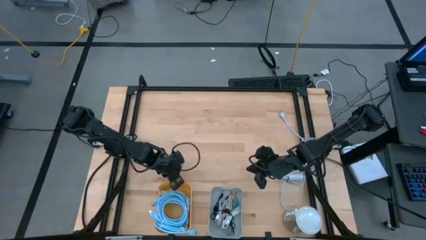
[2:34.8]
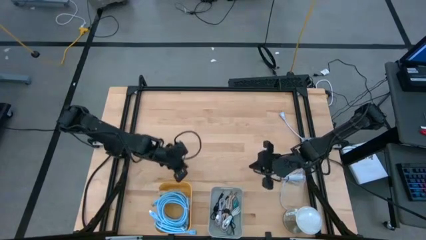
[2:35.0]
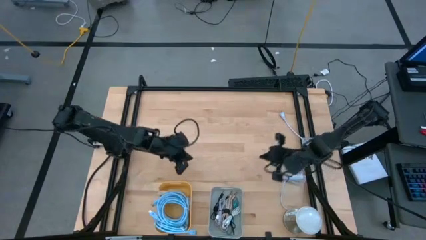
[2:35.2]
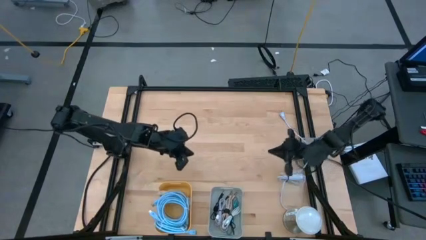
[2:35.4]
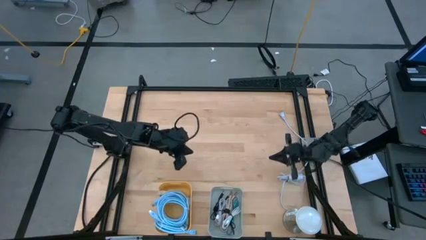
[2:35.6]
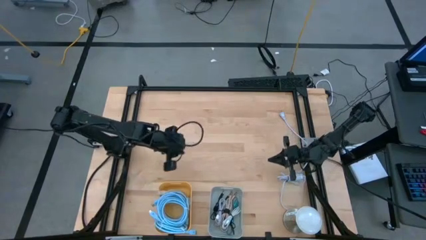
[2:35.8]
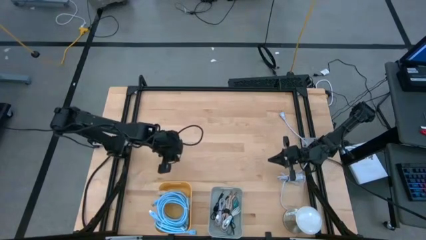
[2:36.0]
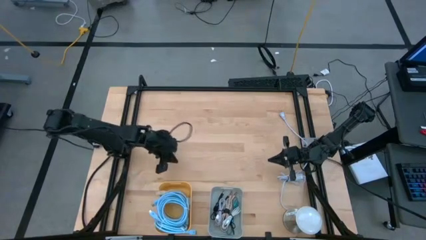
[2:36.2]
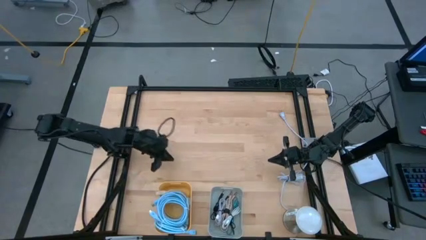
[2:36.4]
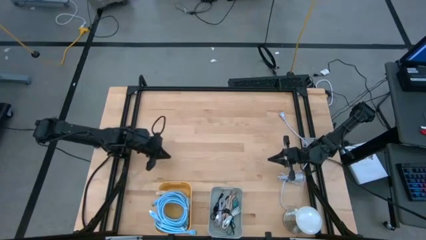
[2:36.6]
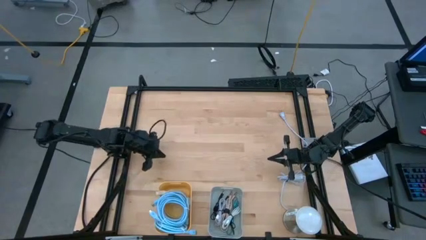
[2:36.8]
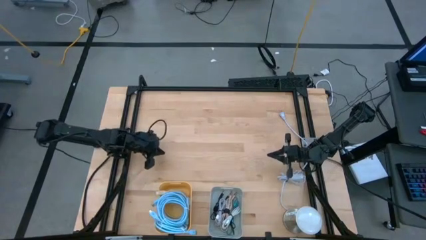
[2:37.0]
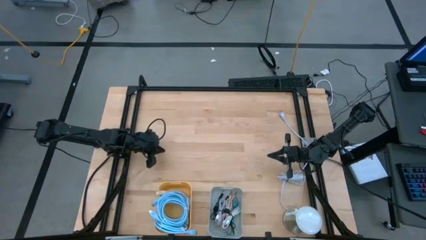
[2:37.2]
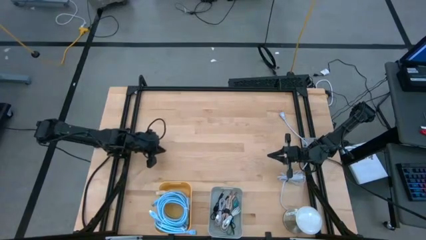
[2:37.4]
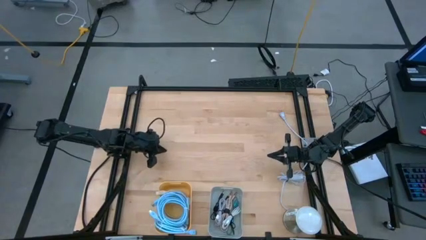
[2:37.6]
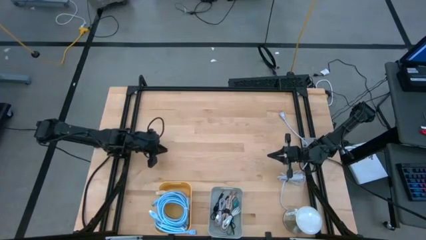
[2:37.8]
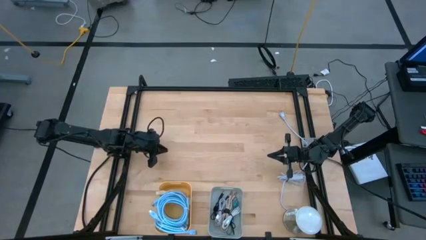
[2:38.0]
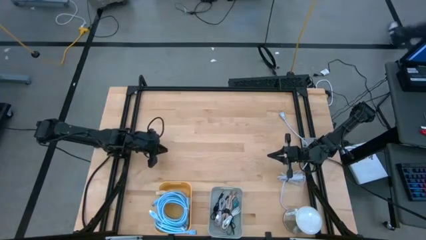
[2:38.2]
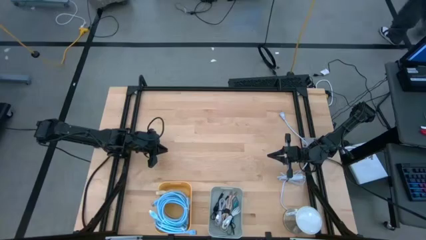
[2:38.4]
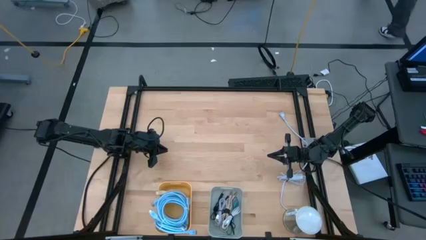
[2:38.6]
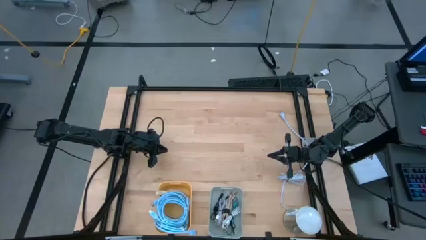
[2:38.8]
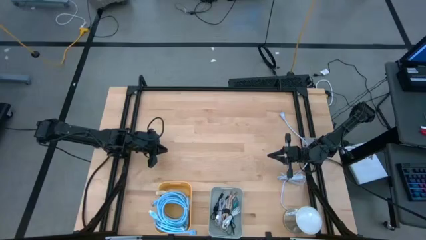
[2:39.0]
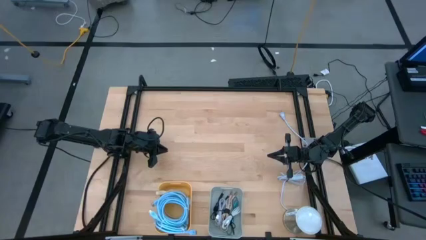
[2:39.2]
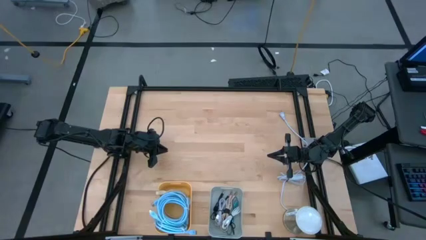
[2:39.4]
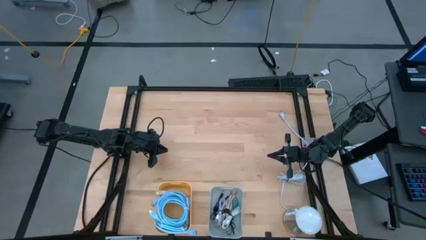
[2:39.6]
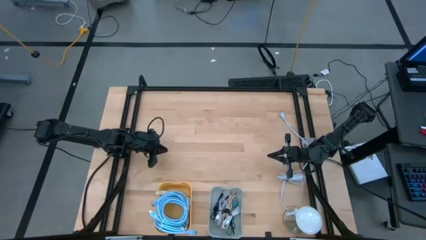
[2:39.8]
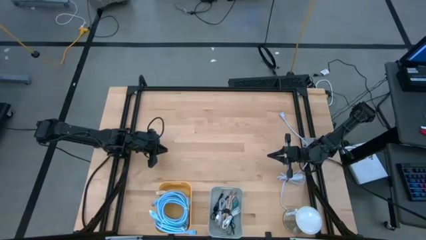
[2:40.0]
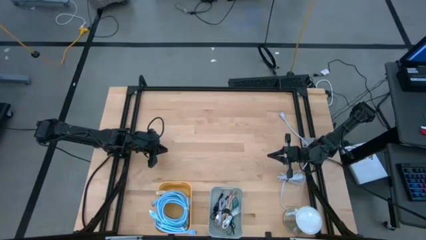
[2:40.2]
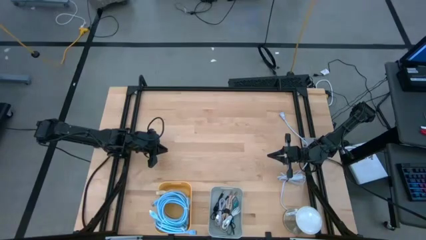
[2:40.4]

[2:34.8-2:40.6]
Task: Sort cables
Return to Home Position

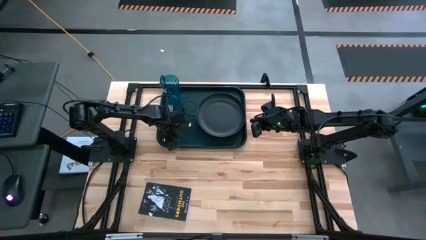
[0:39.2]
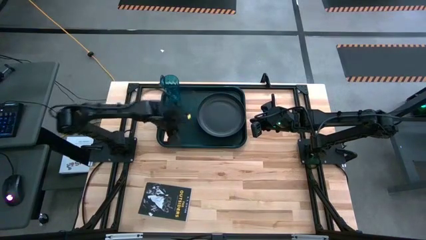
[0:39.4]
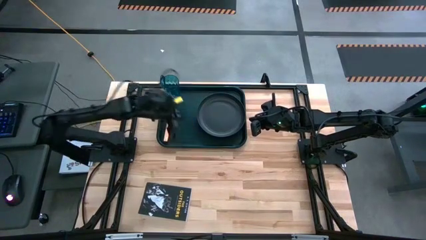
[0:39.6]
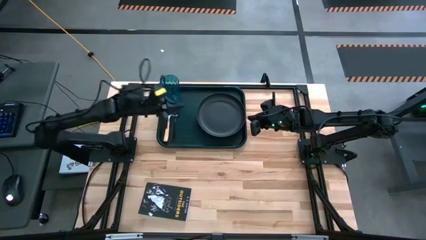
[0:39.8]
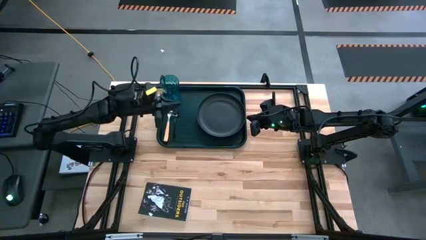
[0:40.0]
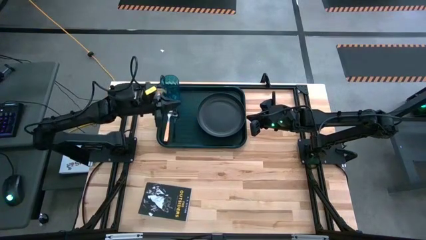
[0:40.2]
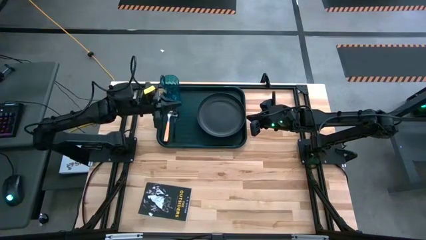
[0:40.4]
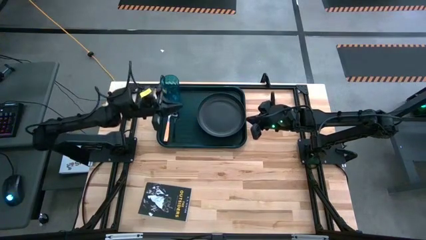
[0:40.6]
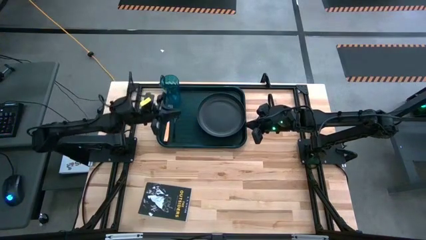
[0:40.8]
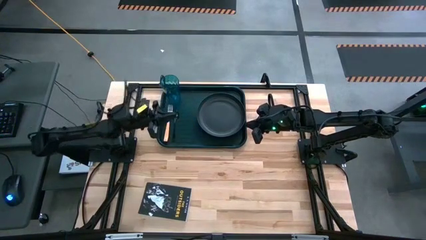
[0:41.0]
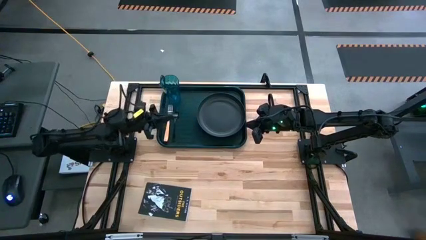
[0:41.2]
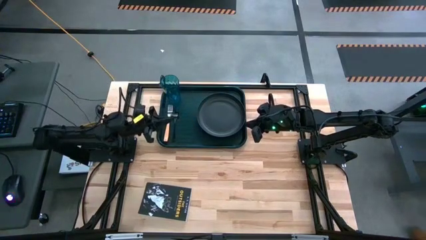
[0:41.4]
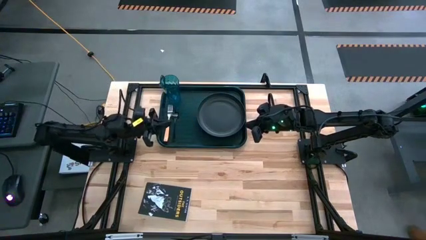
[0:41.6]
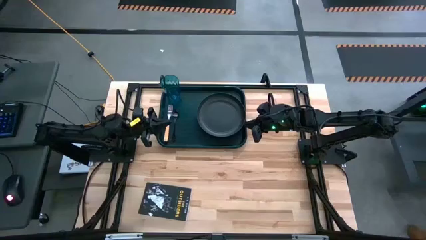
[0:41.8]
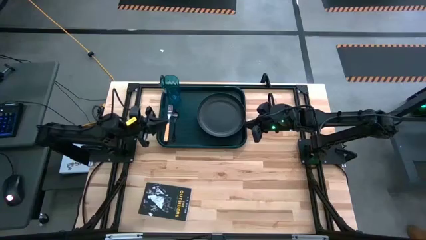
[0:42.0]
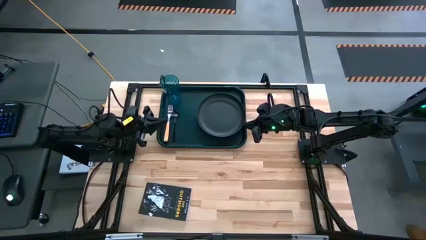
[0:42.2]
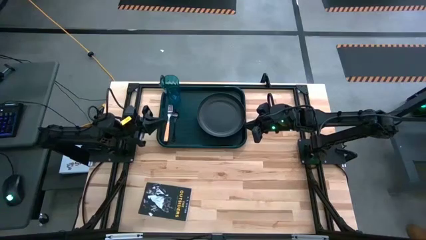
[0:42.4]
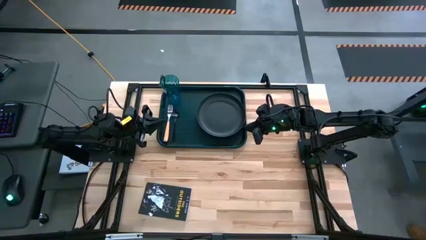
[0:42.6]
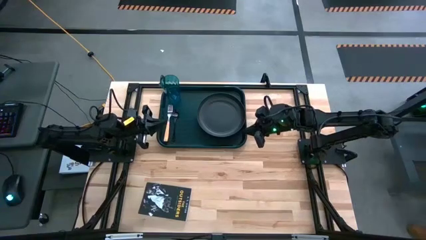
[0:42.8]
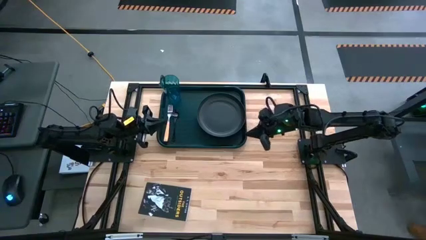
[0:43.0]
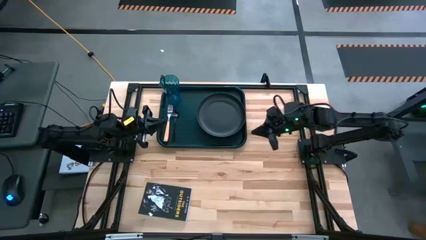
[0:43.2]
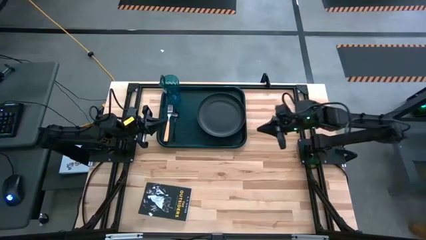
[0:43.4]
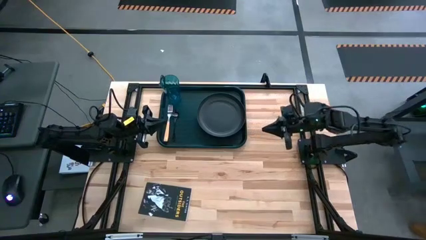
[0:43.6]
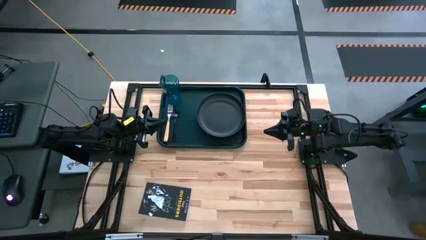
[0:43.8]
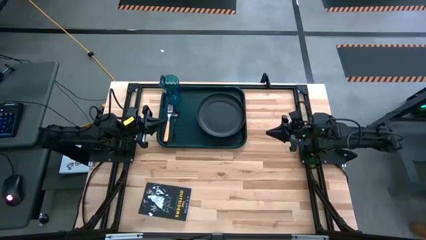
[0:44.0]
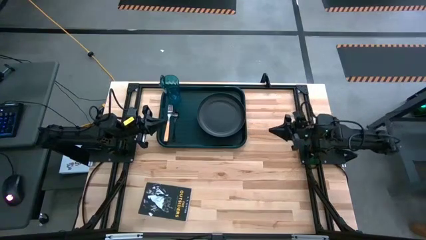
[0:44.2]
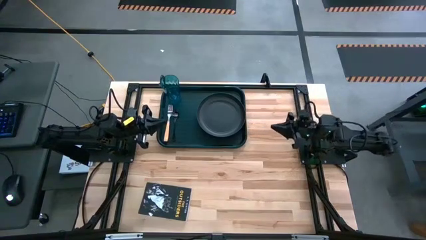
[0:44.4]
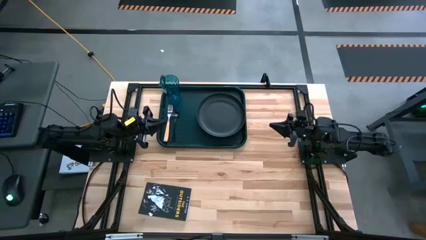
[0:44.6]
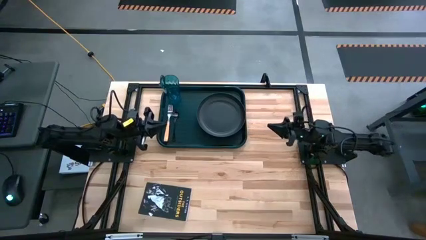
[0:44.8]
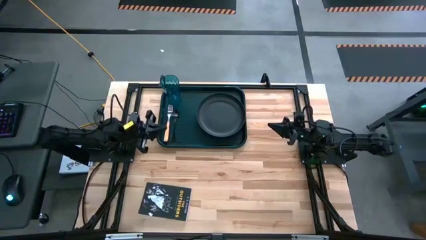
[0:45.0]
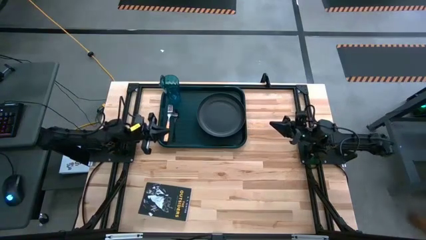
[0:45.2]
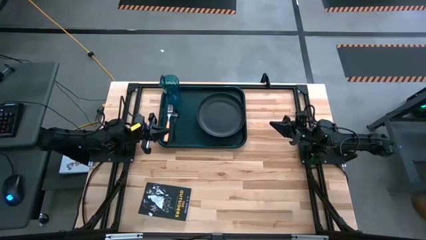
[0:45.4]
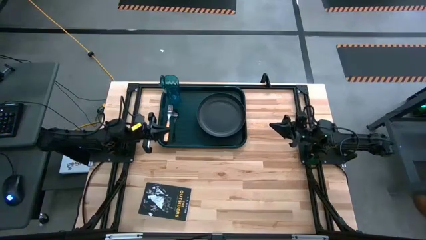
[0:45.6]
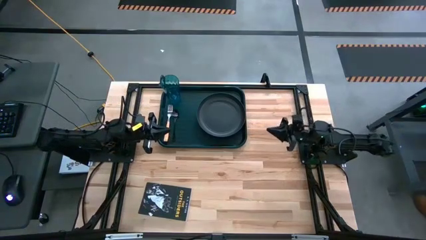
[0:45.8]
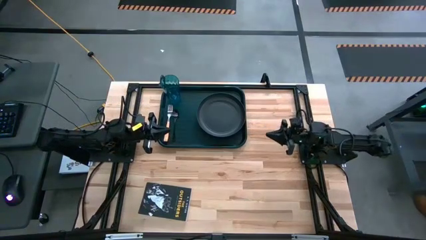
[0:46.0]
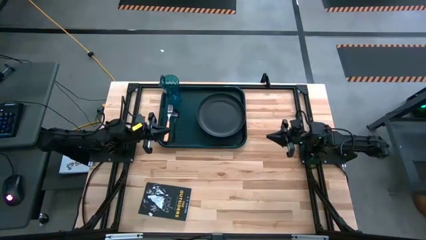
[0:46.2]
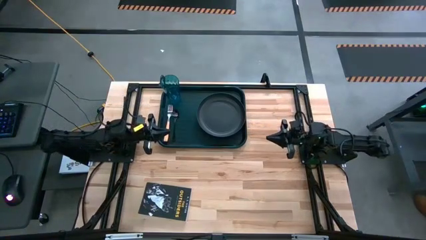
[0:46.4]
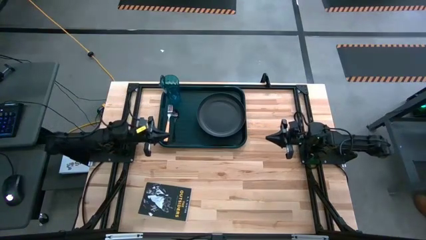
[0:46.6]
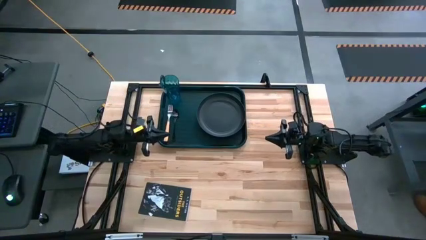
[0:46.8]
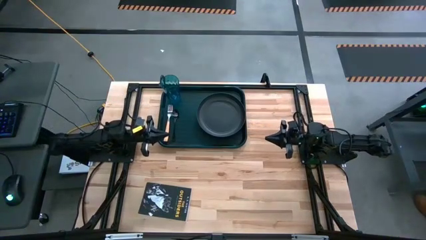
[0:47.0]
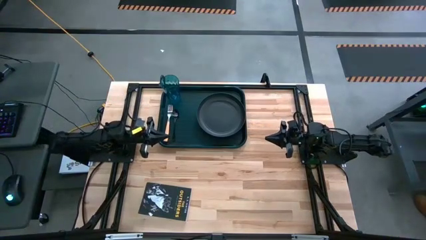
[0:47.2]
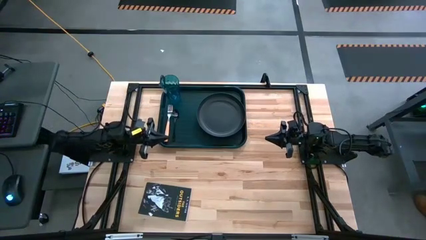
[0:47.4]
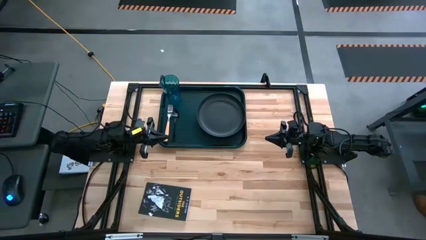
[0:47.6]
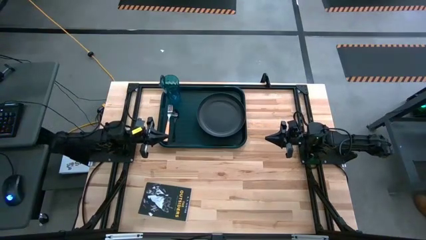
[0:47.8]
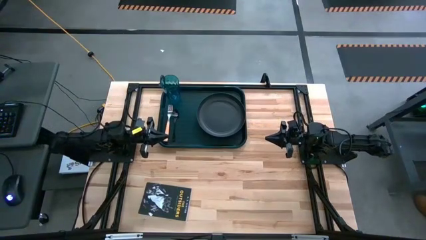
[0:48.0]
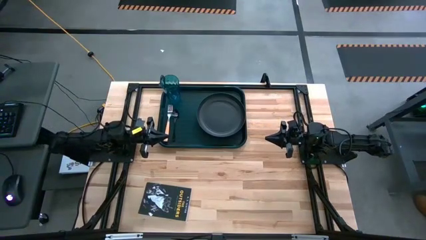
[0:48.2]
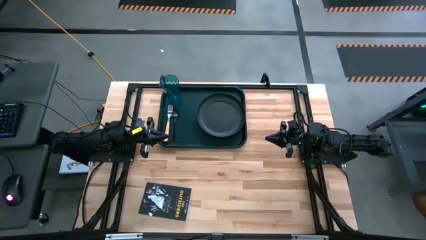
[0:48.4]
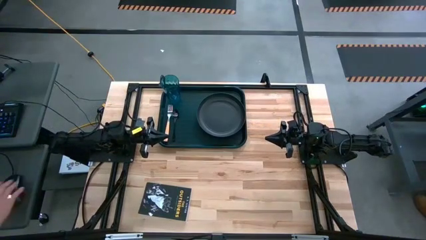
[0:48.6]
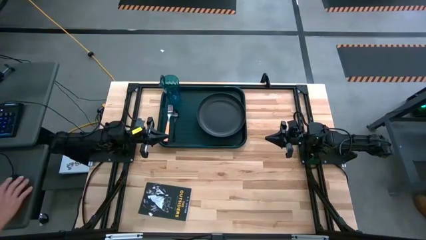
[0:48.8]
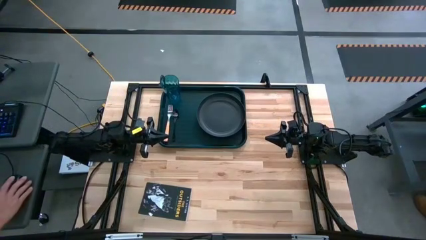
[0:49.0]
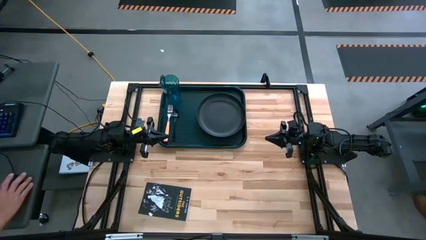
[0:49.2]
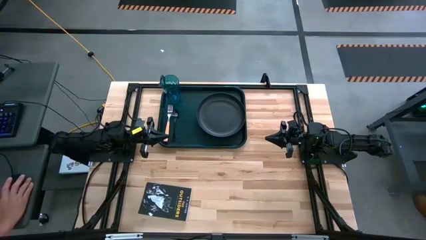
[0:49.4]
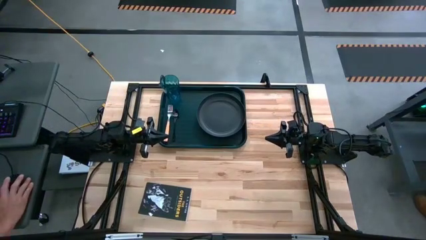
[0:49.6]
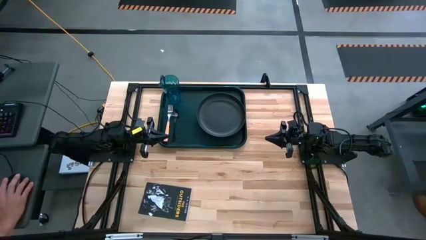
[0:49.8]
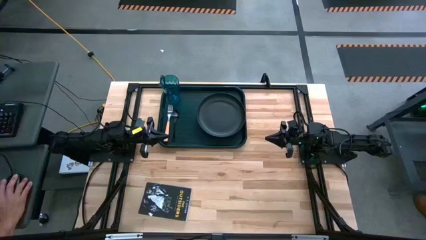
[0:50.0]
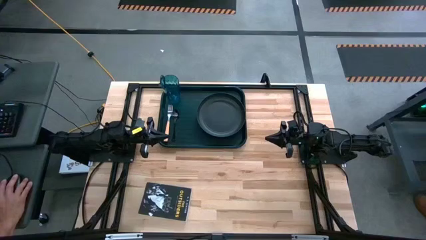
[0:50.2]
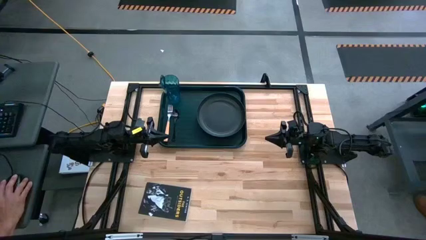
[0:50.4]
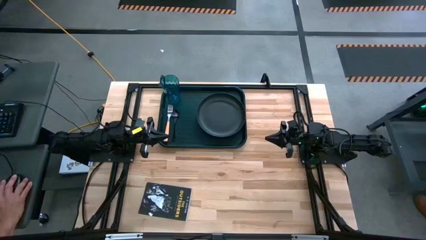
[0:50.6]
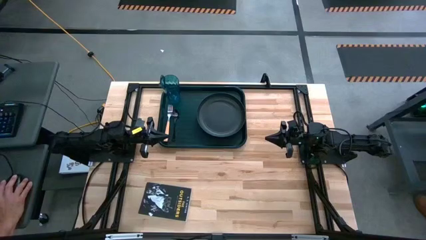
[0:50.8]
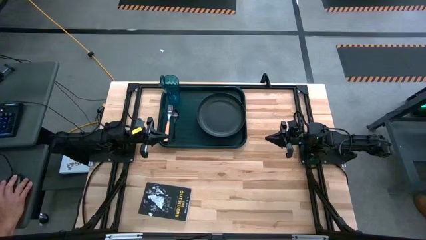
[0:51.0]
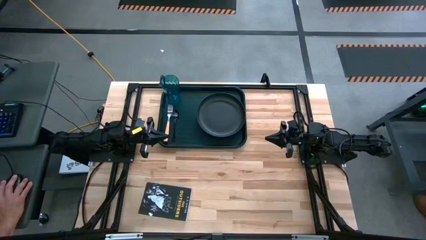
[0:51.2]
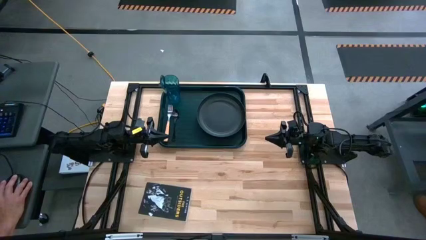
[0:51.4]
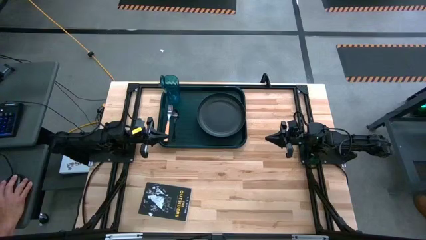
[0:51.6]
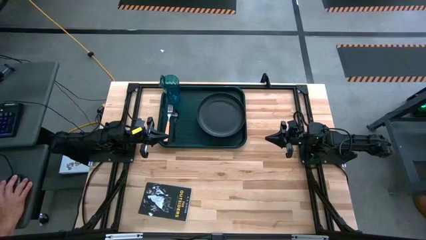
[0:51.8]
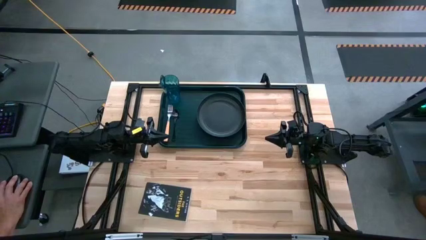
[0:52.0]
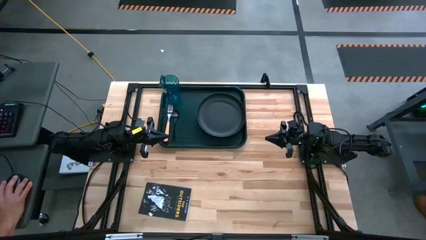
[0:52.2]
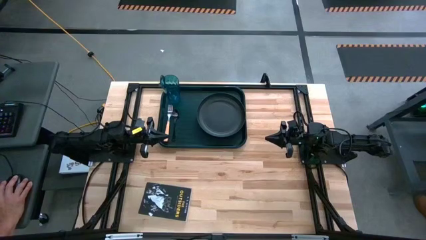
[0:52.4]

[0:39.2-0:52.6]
Task: Pick and place plate/cup/fork/spoon on tray
Return to Home Position
